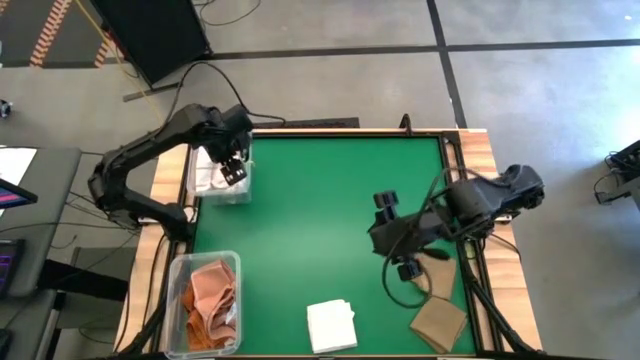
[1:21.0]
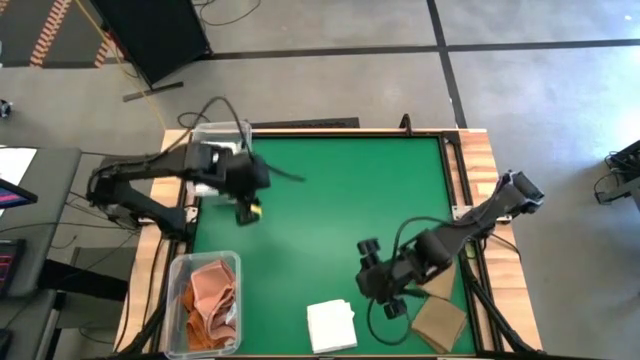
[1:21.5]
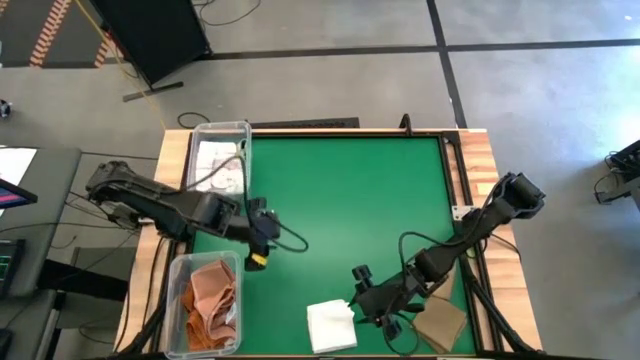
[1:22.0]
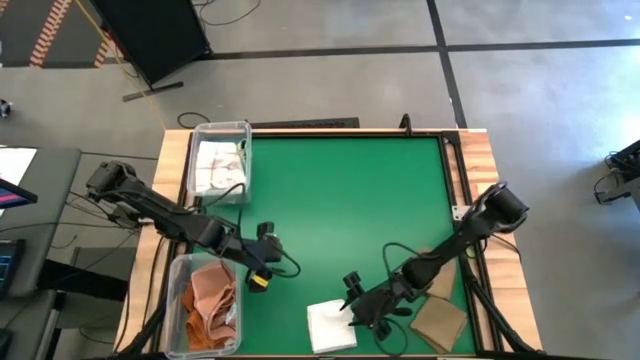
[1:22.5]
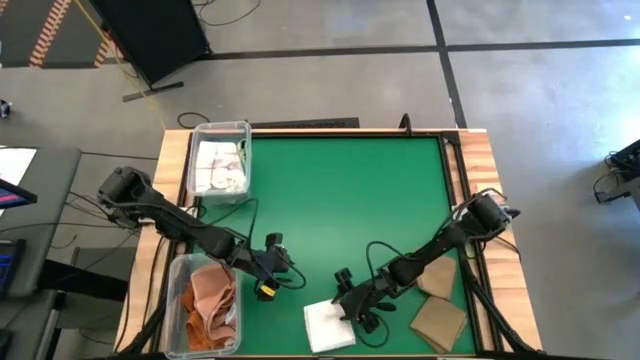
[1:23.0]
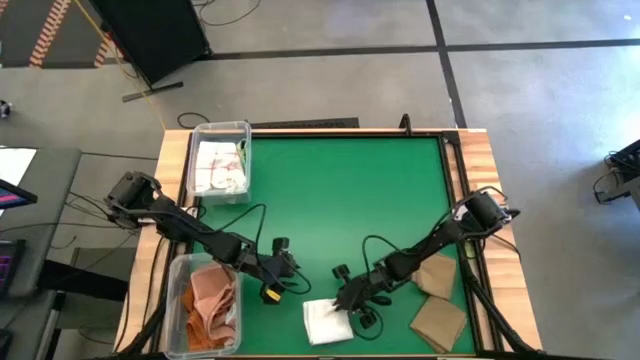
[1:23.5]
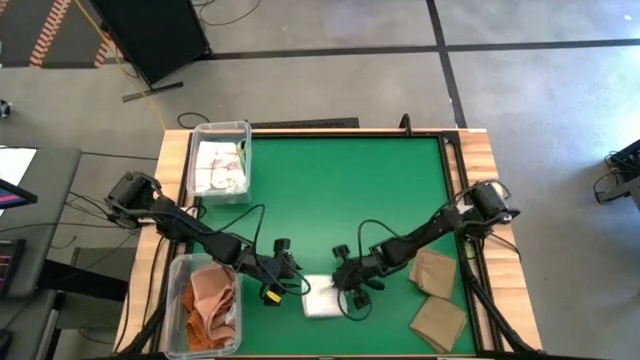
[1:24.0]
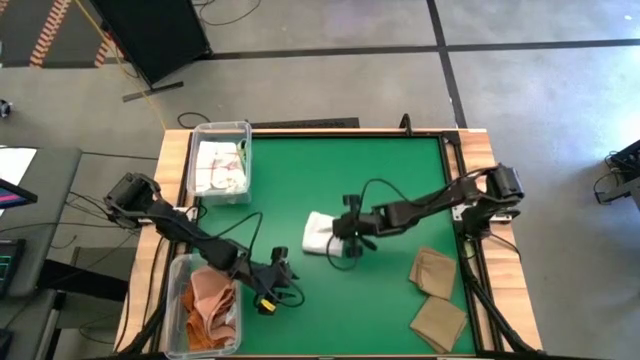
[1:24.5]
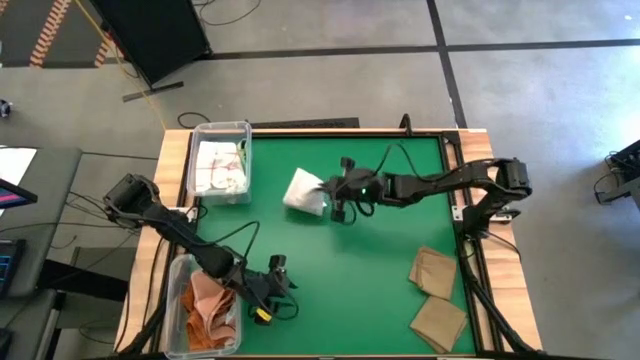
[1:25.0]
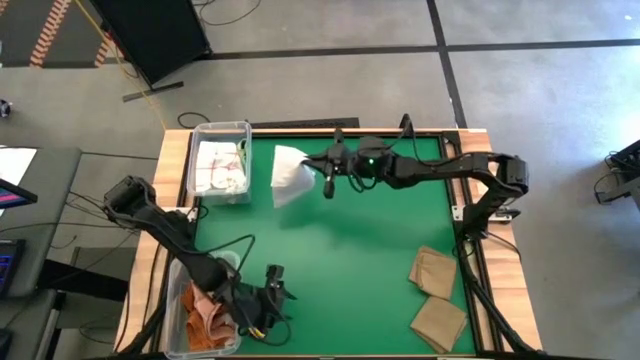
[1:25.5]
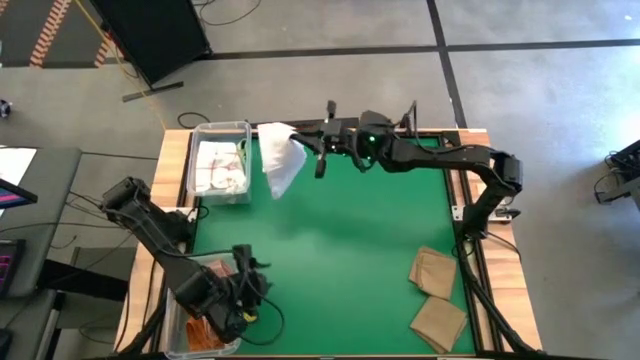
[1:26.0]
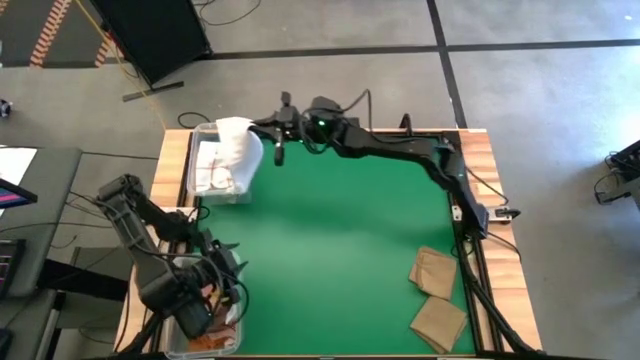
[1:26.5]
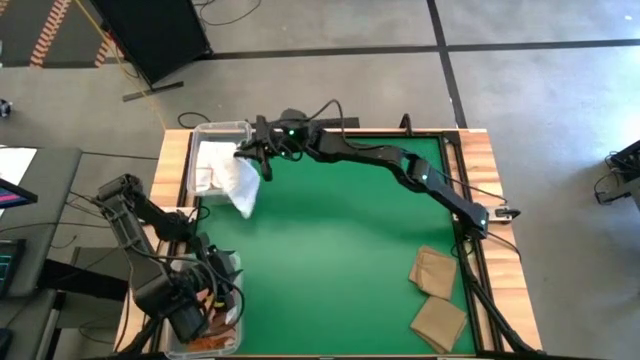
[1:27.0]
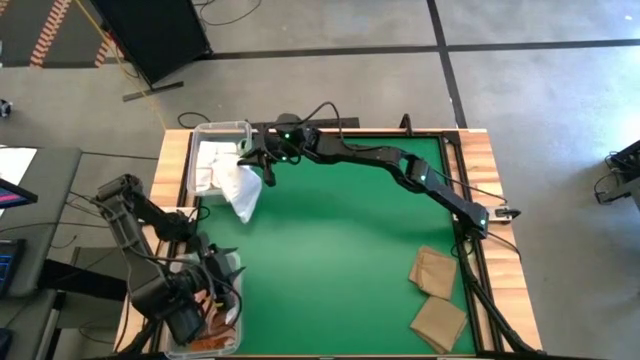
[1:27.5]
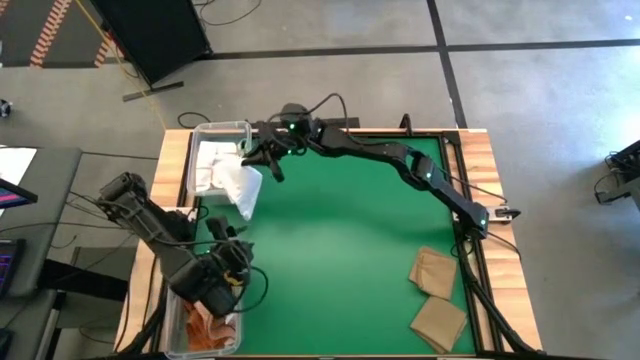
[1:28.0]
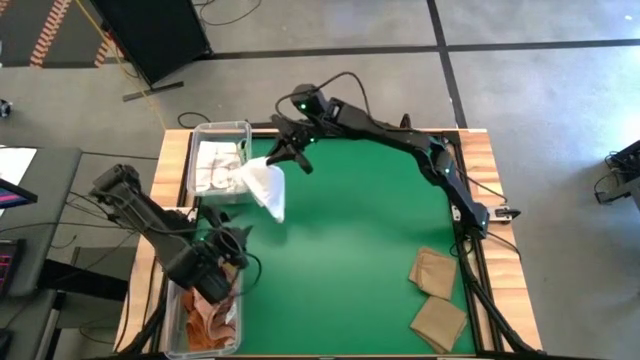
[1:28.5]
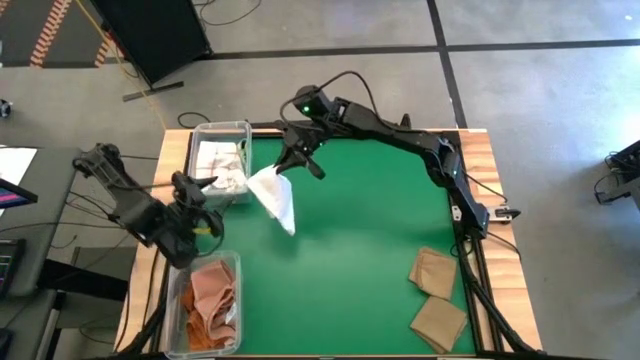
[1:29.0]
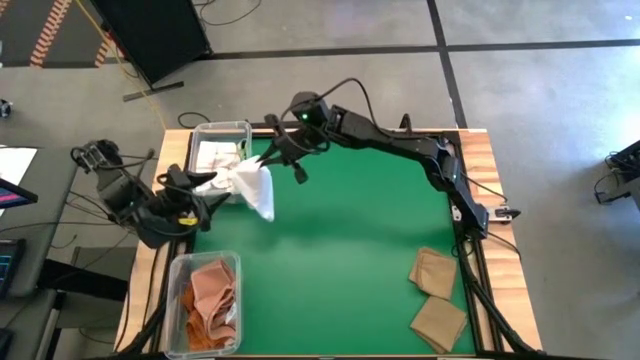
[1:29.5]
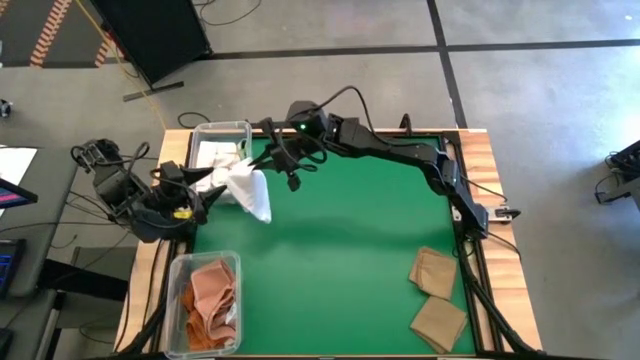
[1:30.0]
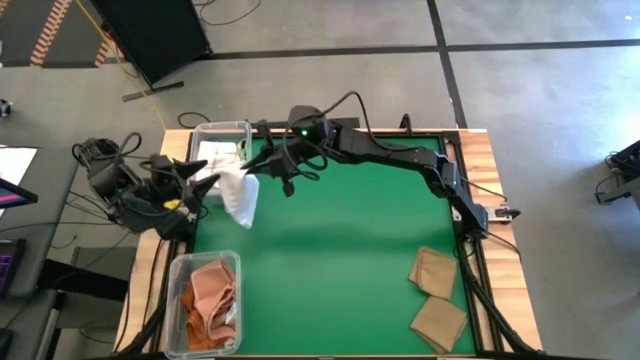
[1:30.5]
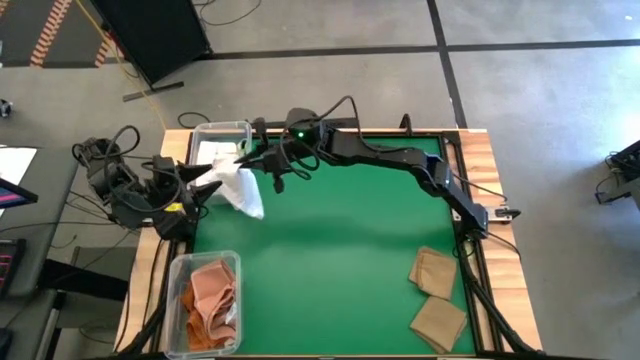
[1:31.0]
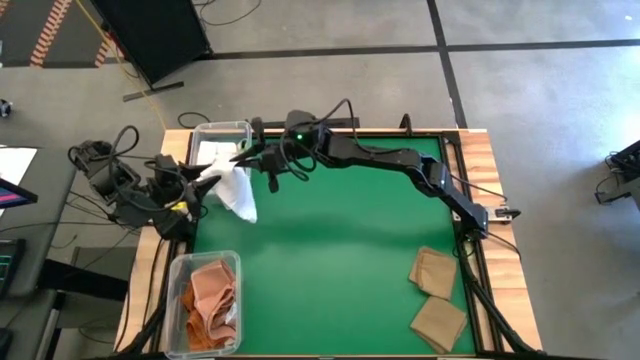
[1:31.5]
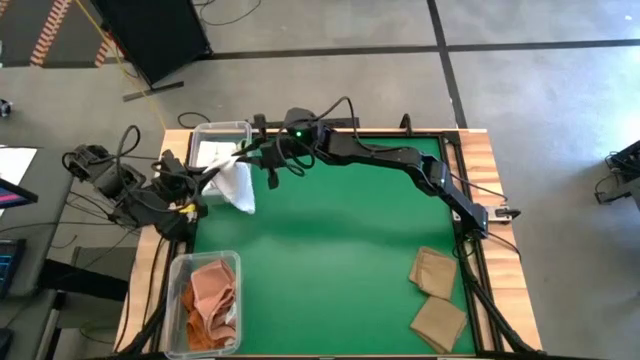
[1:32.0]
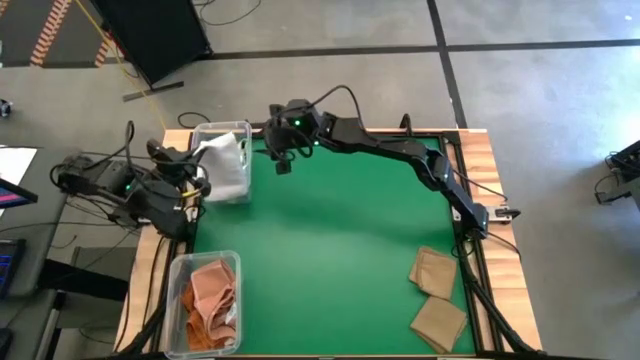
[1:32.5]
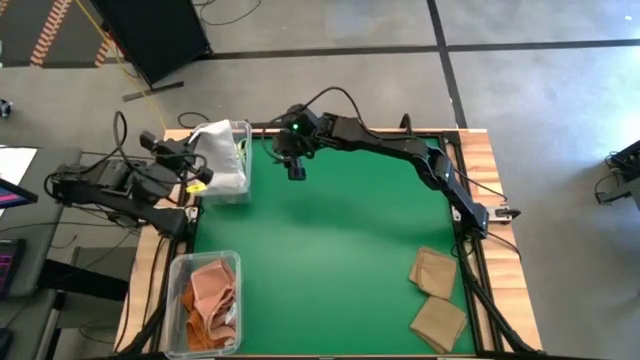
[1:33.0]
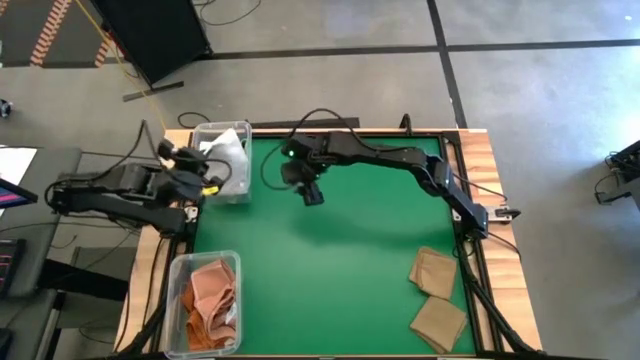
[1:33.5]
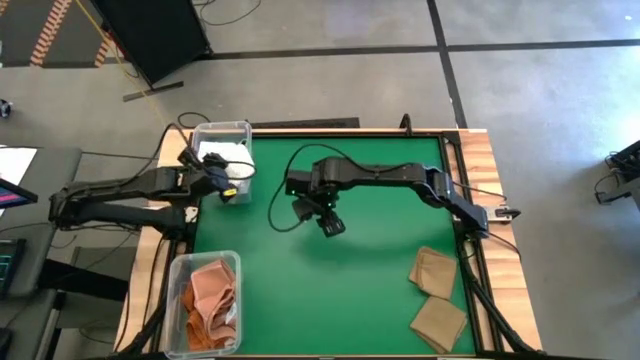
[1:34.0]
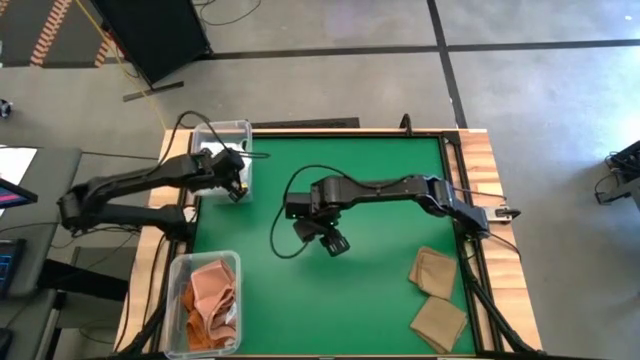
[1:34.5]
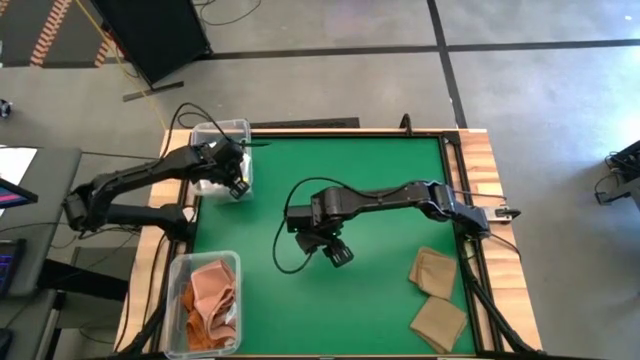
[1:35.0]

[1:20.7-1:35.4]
Task: Sort towels by color in basket
Put the white towel into the top transparent bin

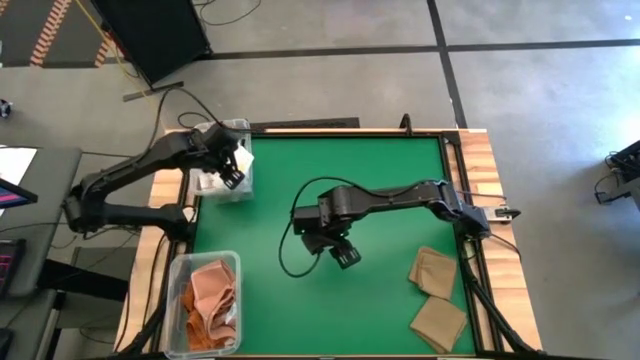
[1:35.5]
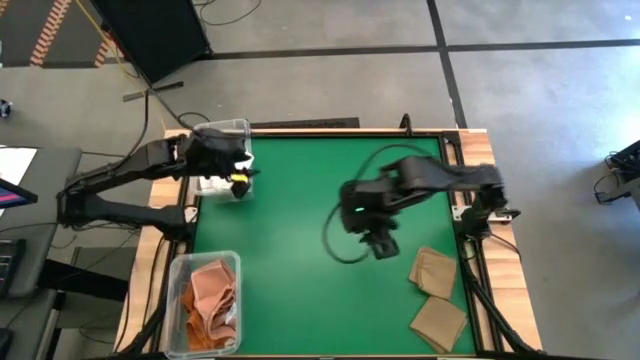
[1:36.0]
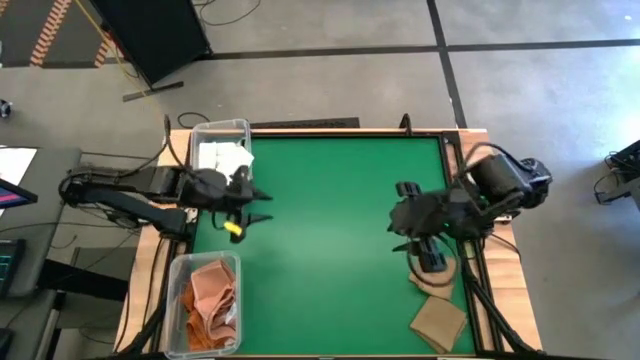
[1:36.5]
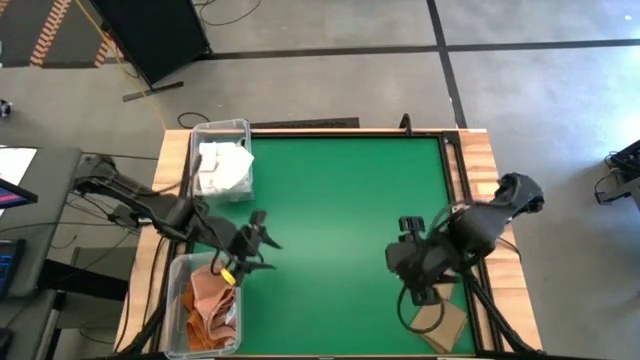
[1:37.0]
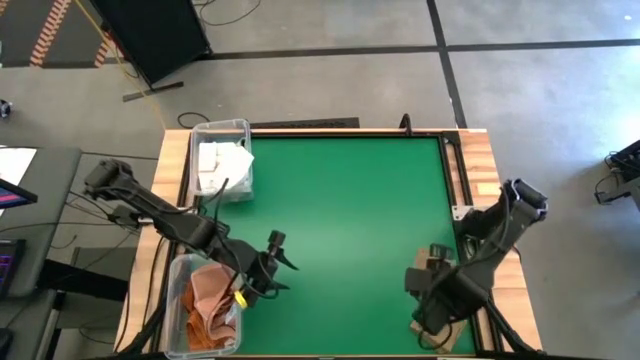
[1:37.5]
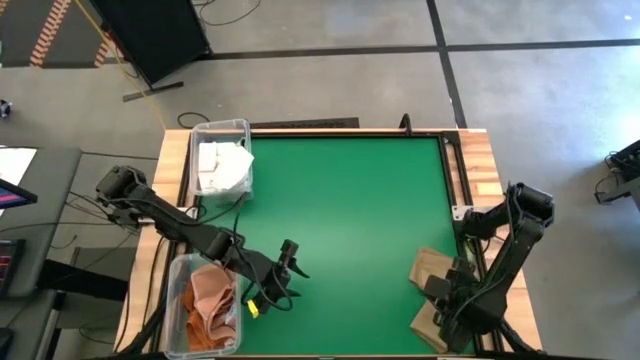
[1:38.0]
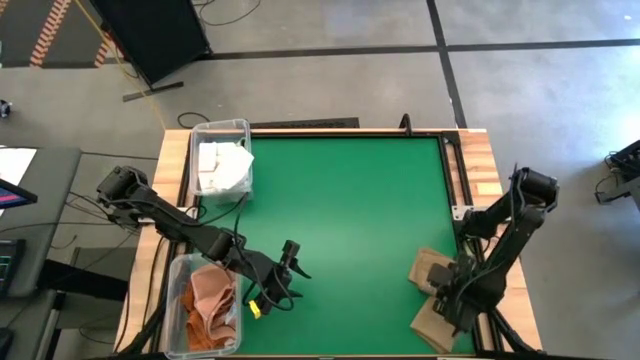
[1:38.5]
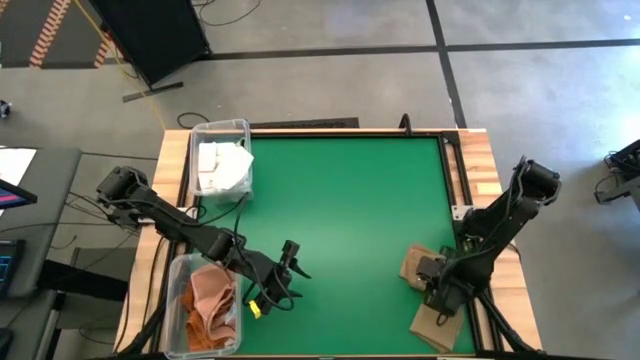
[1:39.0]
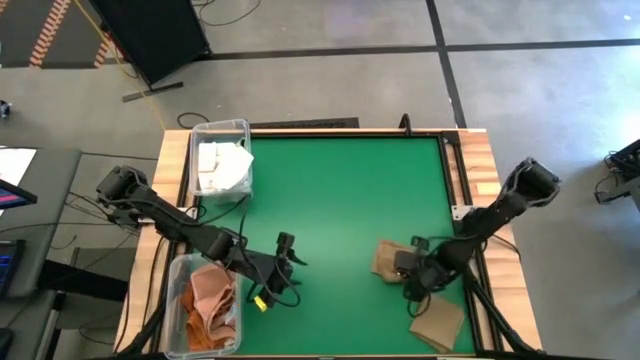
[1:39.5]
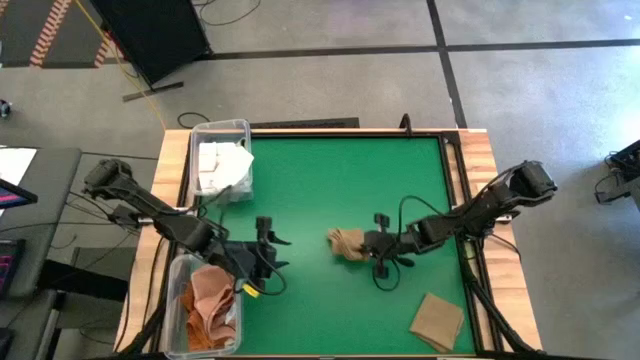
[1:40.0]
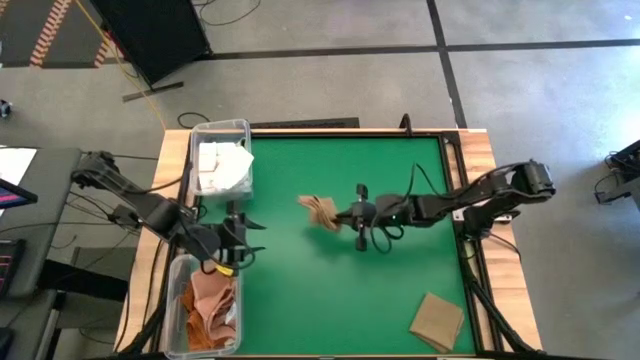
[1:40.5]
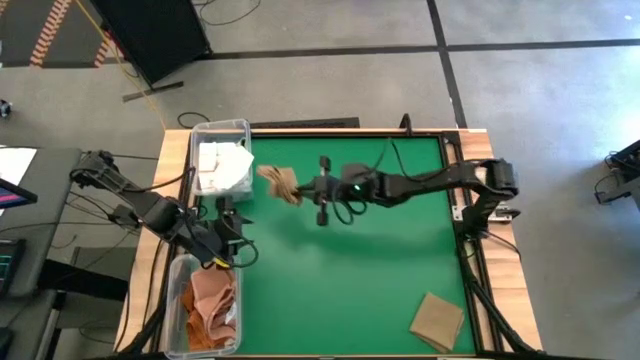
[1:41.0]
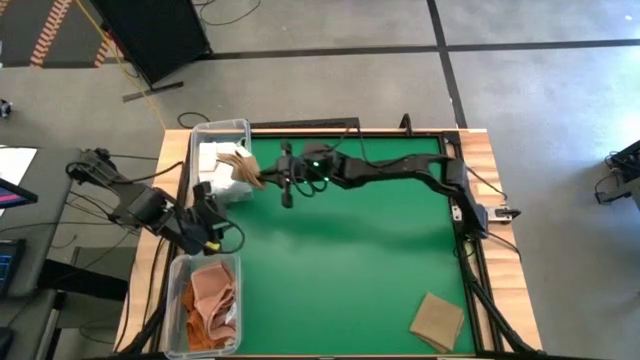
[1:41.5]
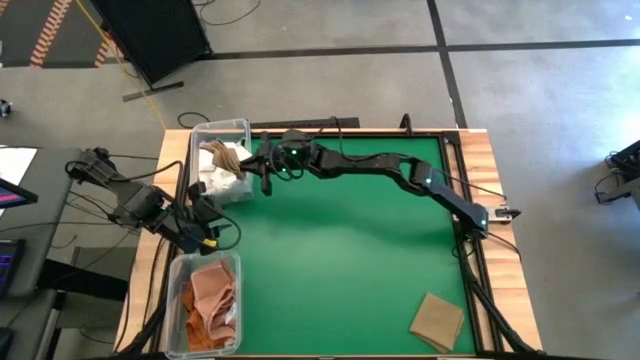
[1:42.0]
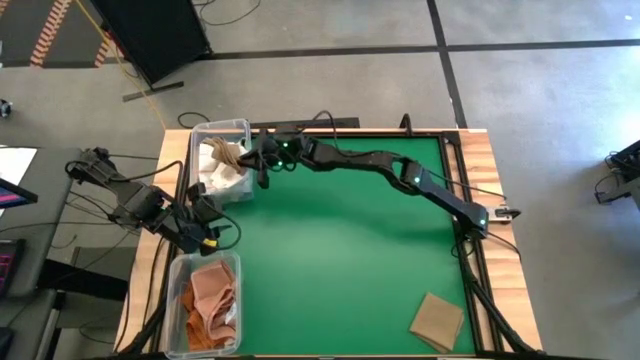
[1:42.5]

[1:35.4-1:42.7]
Put the top brown towel into the top transparent bin

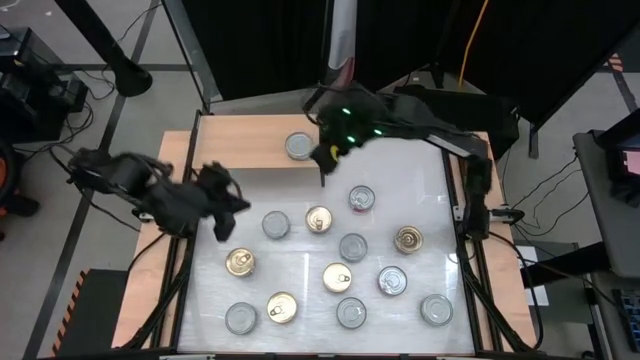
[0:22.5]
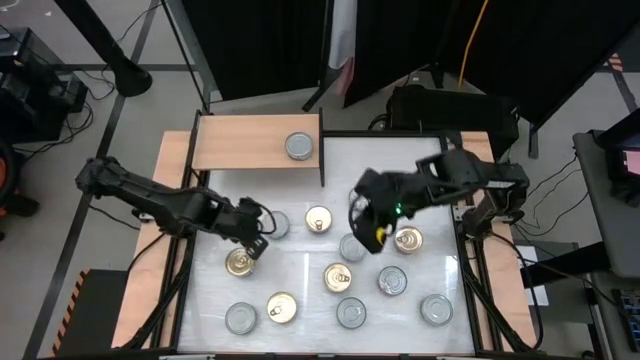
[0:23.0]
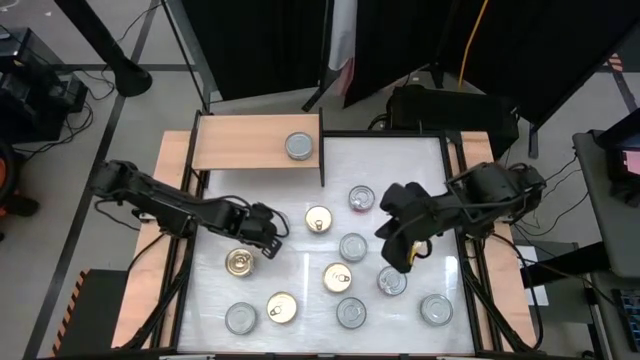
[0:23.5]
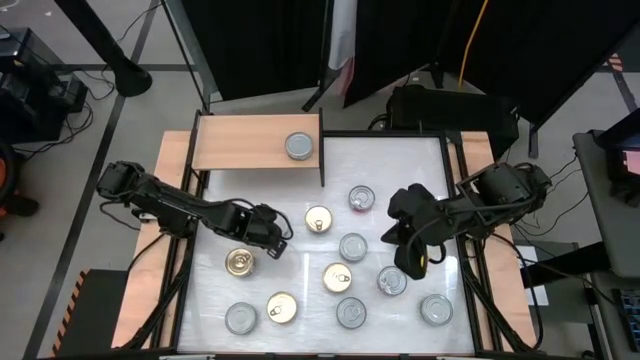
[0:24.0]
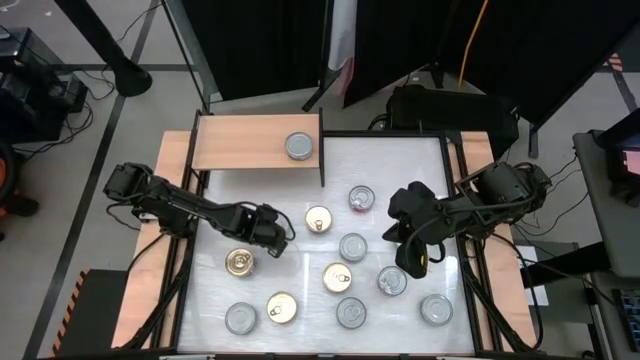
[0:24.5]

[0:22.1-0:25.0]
Task: Stack canned seafood by type on shelf
Prepare the green white tuna can
